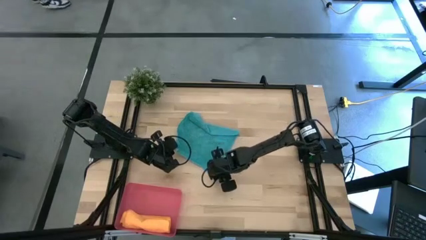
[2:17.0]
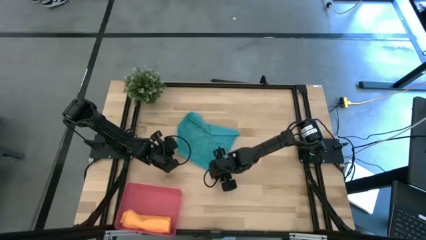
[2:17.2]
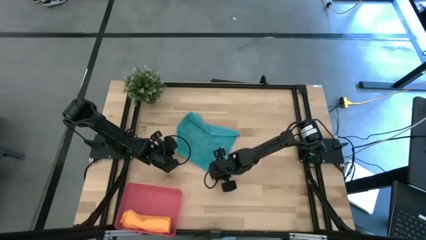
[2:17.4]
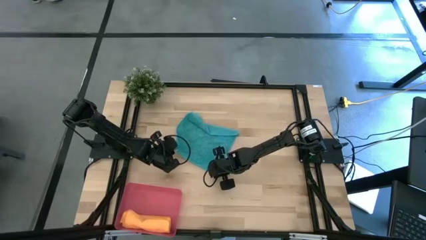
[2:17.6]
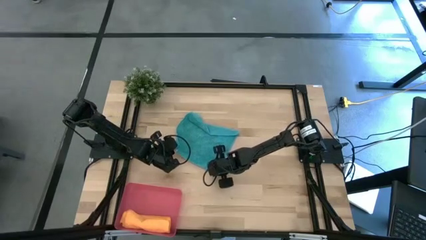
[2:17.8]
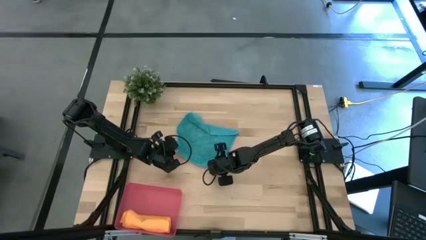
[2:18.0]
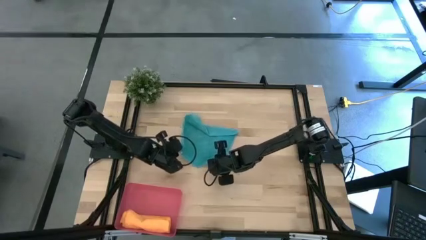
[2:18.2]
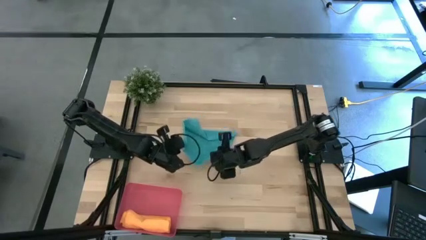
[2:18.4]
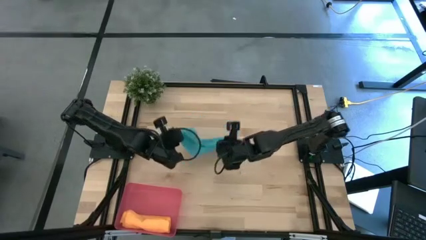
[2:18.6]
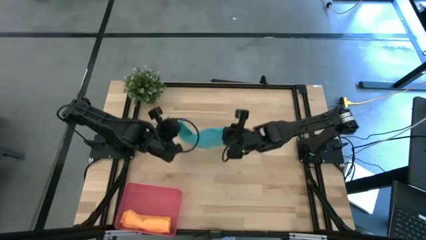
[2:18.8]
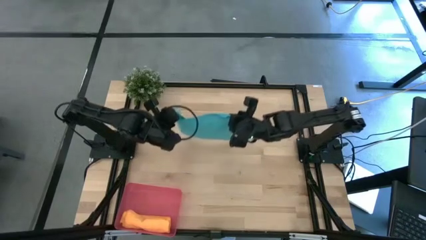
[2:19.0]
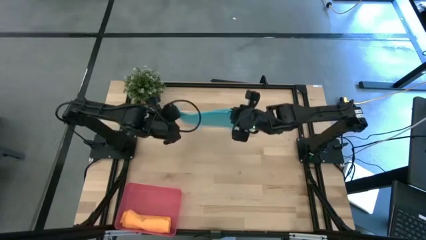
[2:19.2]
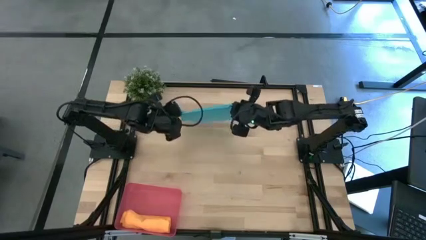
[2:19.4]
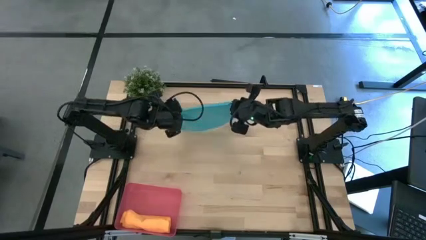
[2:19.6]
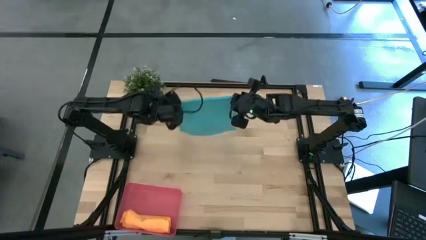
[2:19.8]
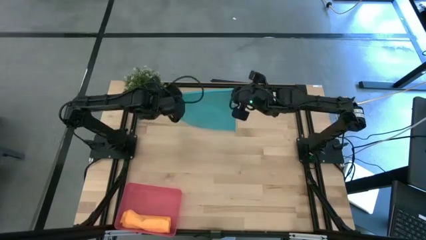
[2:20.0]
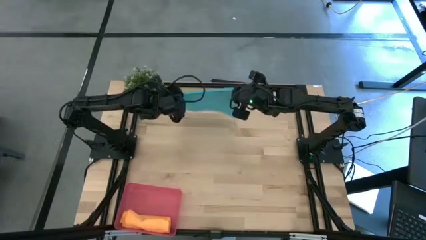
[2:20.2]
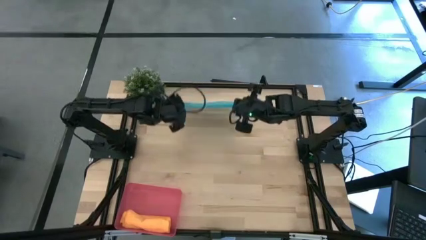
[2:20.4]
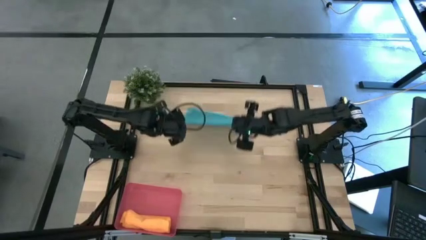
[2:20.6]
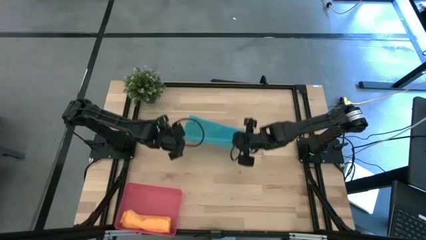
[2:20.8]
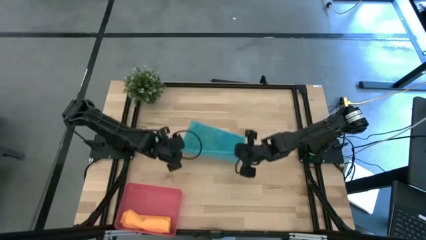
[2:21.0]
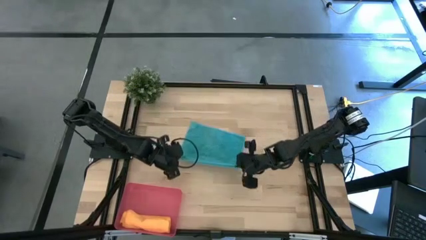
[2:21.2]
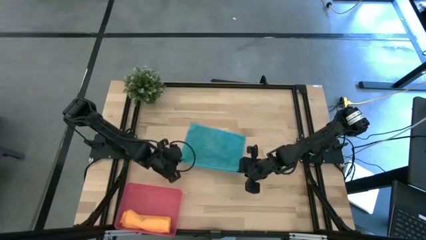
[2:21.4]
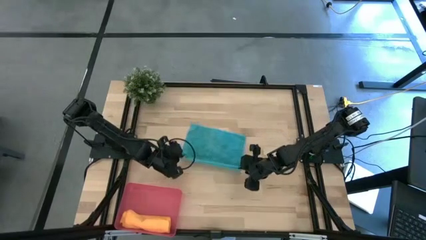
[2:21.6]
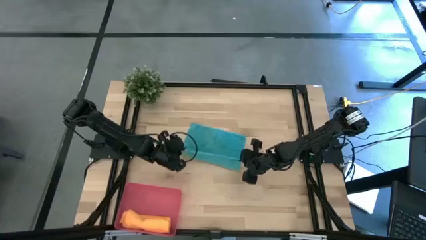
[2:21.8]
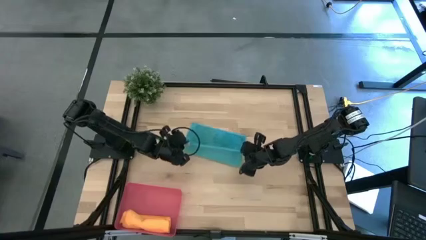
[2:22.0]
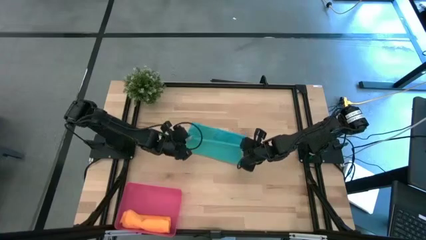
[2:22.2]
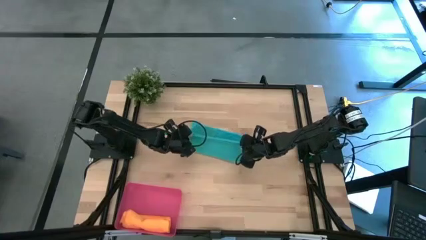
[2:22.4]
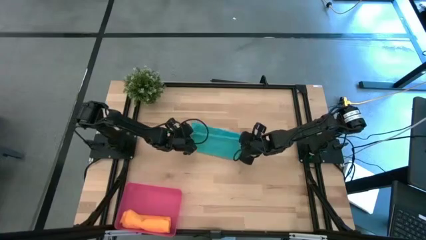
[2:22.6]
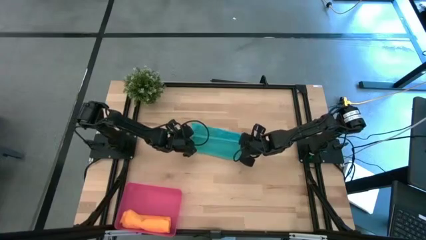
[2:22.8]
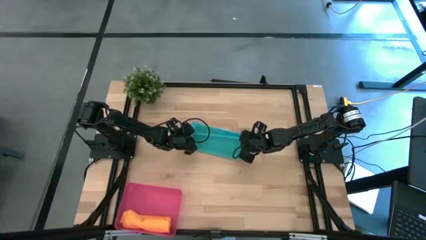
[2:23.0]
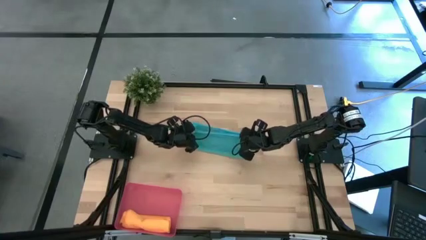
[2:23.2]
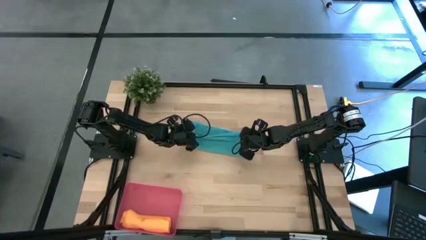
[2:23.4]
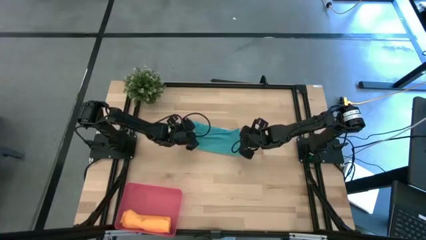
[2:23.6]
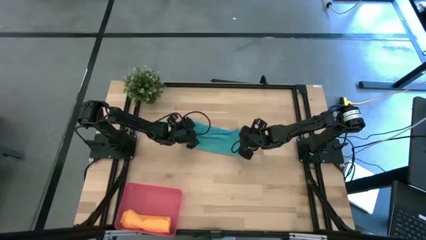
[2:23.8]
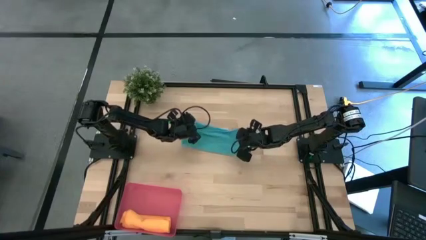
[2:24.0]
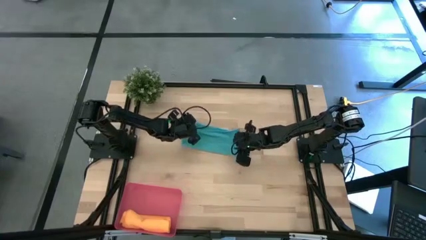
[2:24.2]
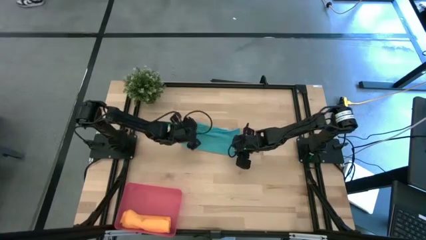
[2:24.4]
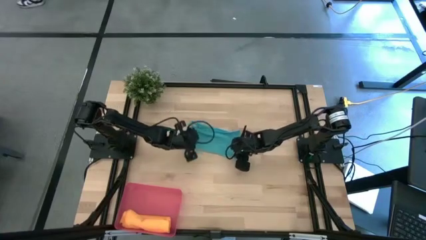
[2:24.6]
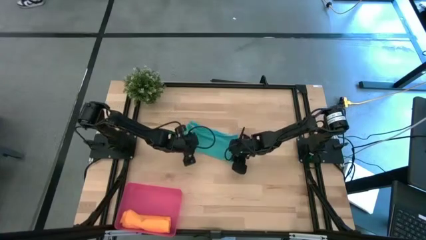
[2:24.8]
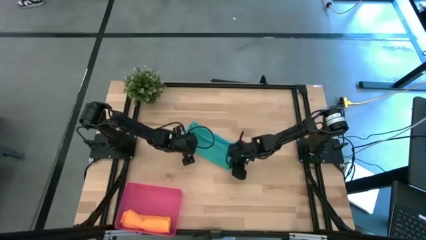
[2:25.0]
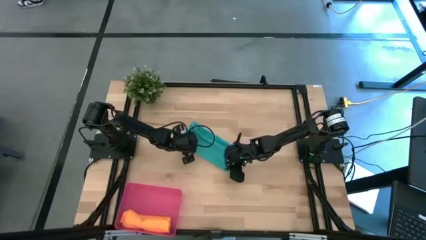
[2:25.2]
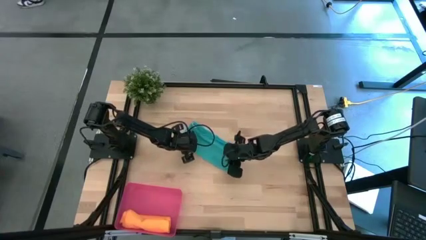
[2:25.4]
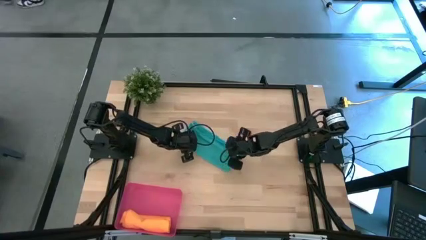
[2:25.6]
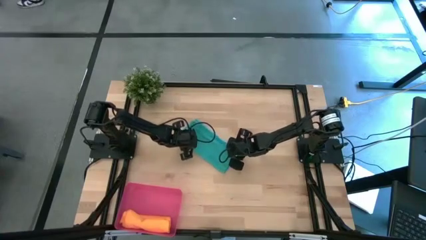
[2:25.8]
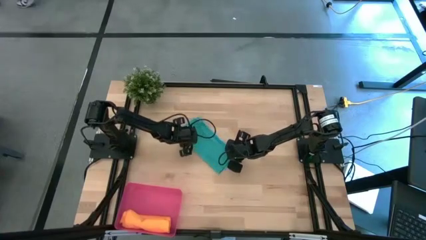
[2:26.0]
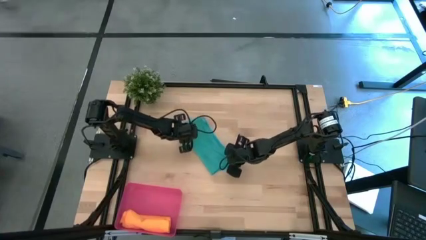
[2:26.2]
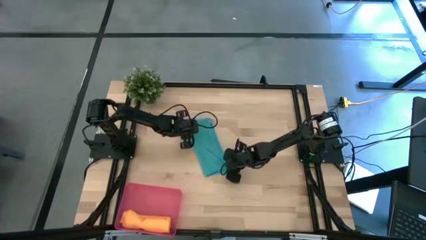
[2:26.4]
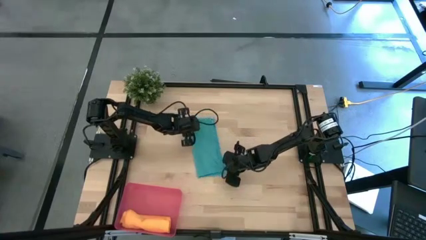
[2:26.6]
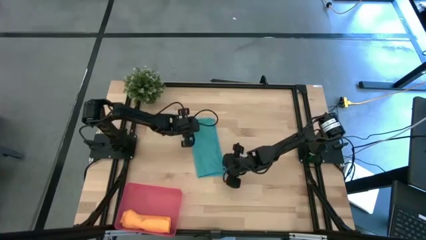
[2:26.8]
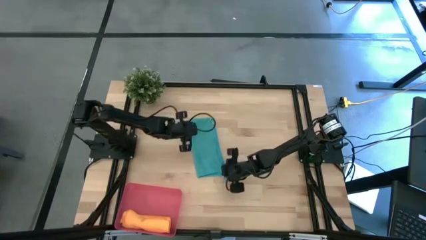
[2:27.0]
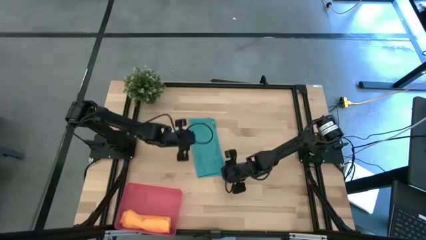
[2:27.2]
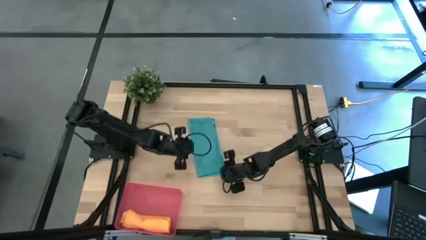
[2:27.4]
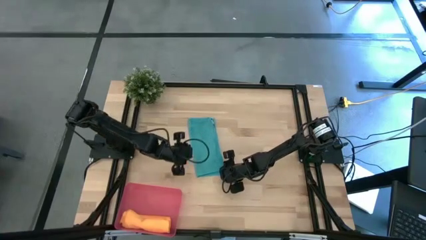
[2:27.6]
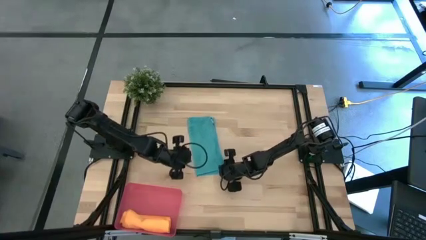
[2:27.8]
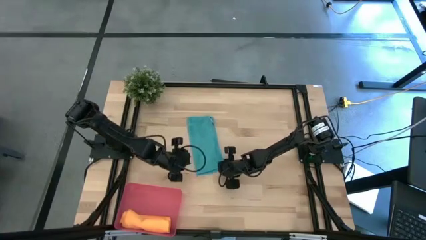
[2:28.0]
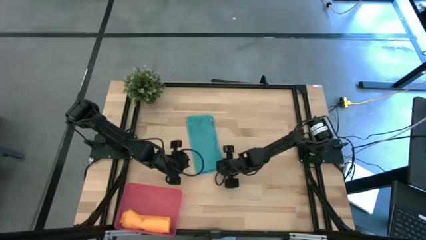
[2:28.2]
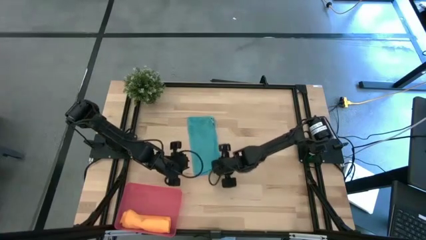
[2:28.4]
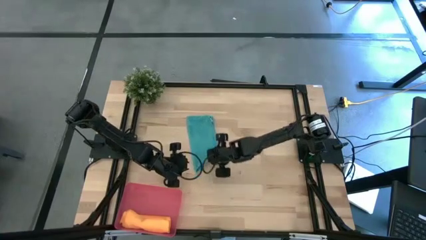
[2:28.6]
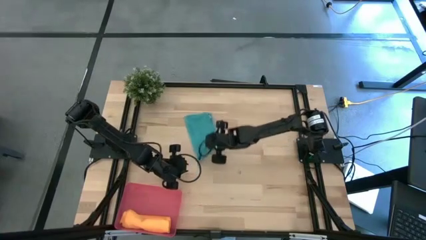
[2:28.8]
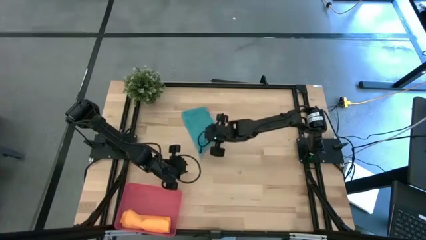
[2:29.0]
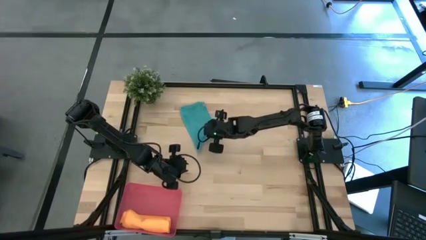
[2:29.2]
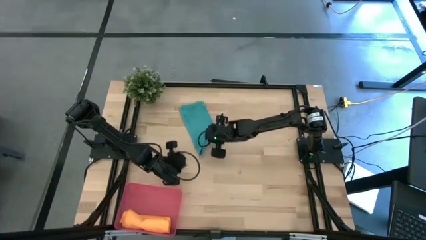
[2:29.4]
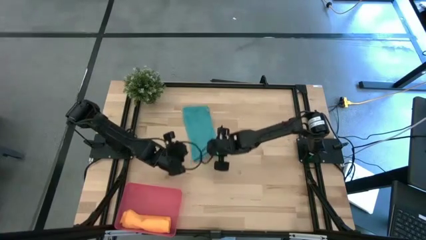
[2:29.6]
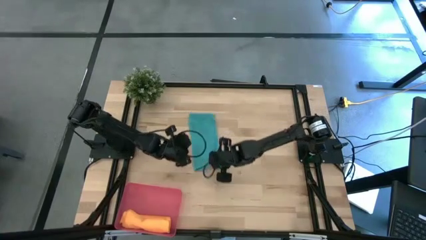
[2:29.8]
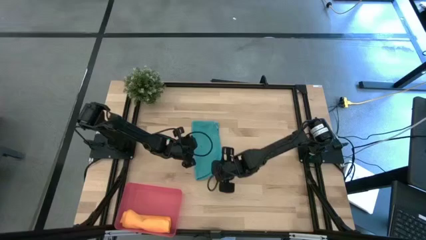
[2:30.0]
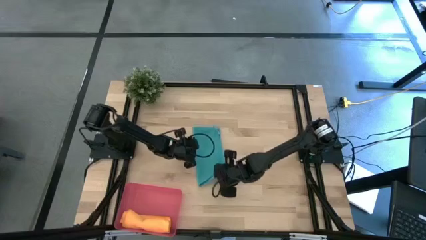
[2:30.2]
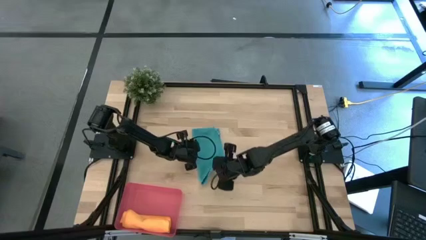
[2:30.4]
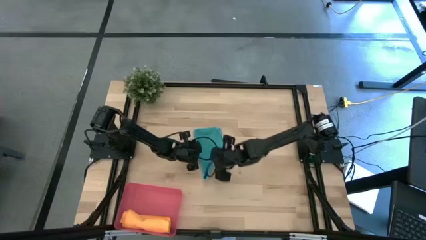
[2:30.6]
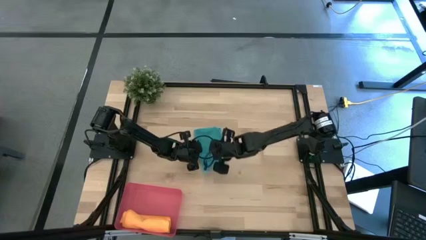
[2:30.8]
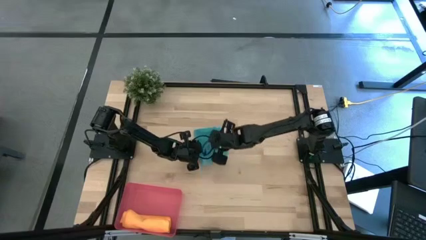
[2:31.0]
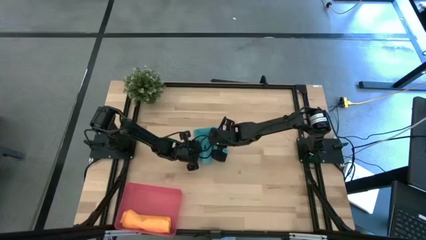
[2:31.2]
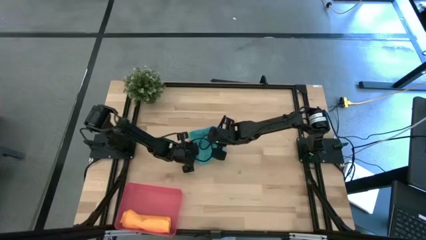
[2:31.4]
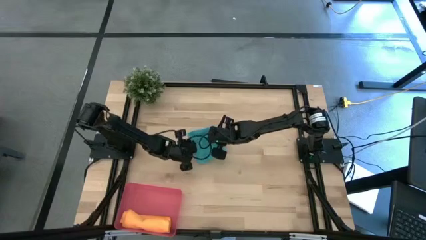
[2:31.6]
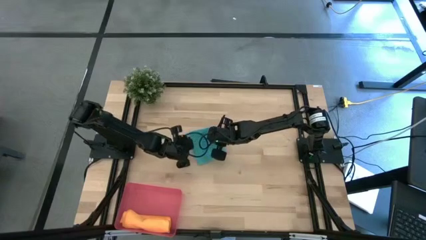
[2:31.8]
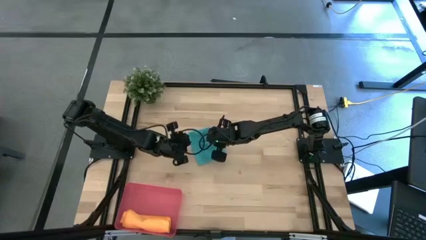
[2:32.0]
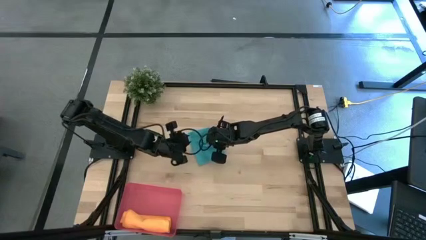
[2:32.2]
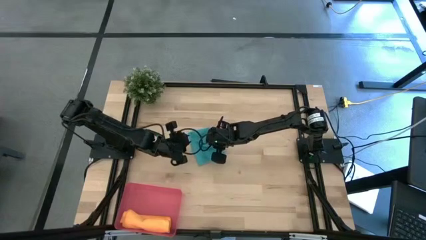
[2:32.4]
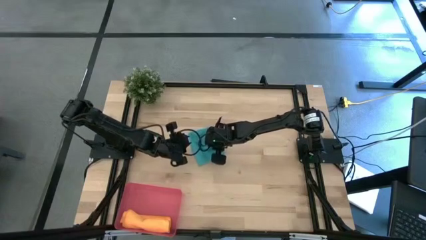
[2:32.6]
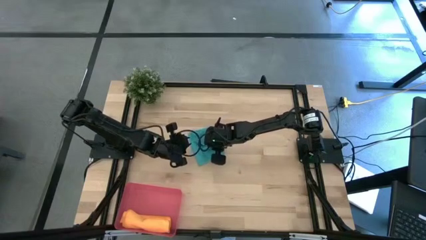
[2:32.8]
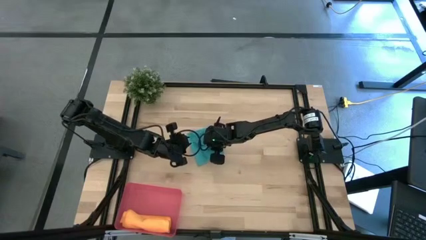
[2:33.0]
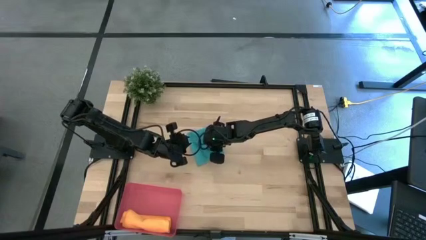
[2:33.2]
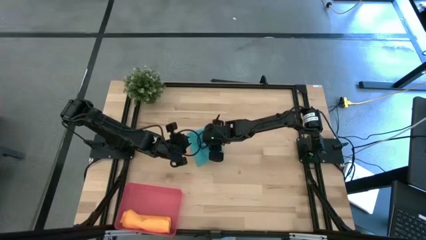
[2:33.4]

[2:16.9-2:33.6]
Task: Roll microfiber towels into tight, uniform cylinder then place into a basket
Fold the blue microfiber cloth
